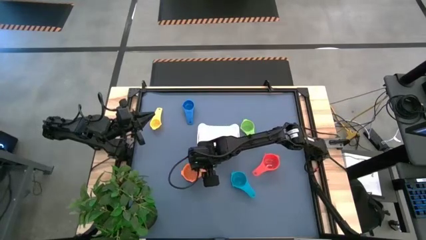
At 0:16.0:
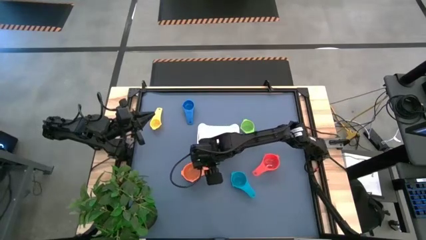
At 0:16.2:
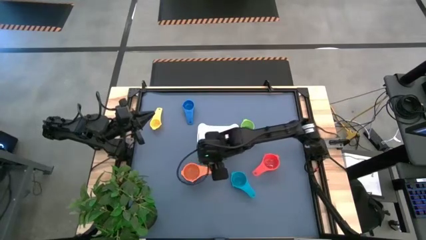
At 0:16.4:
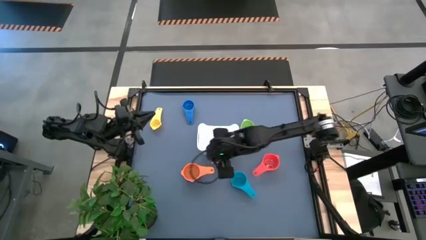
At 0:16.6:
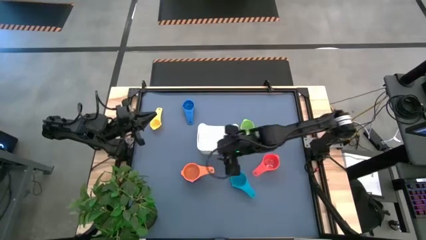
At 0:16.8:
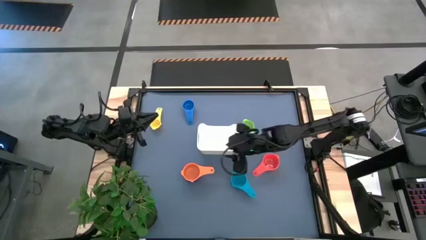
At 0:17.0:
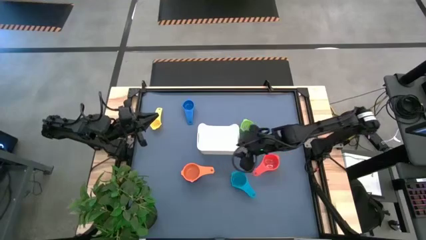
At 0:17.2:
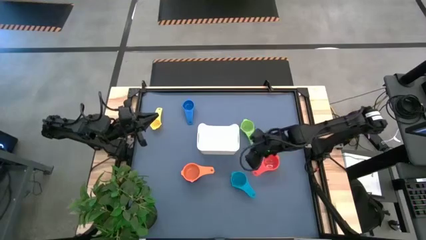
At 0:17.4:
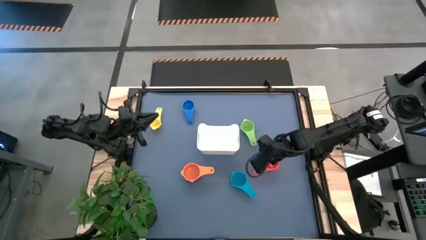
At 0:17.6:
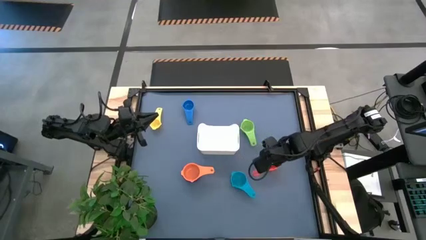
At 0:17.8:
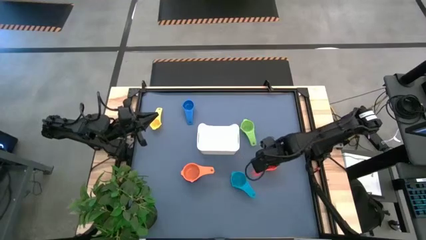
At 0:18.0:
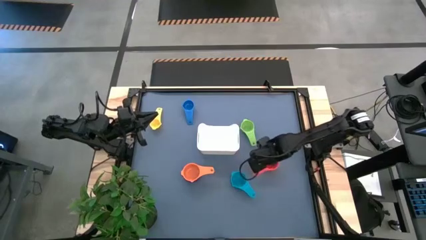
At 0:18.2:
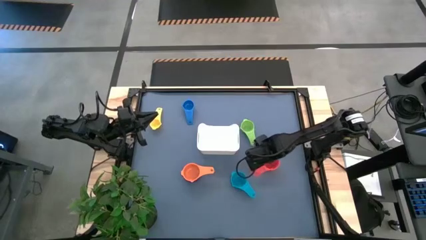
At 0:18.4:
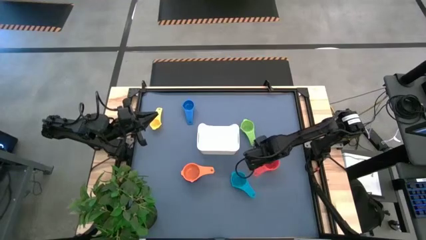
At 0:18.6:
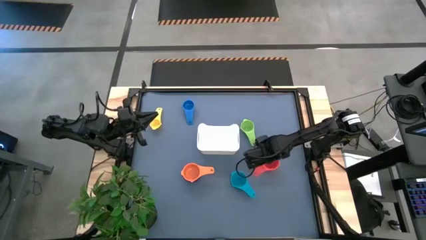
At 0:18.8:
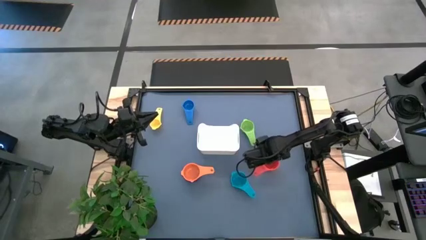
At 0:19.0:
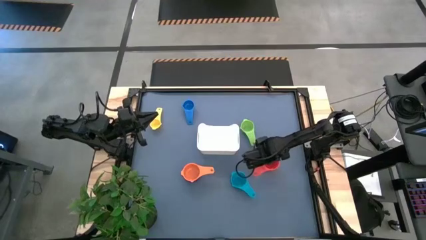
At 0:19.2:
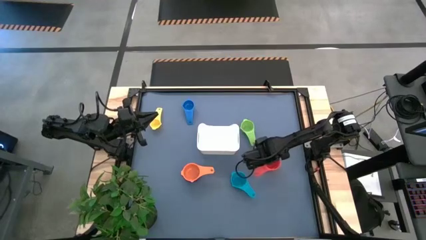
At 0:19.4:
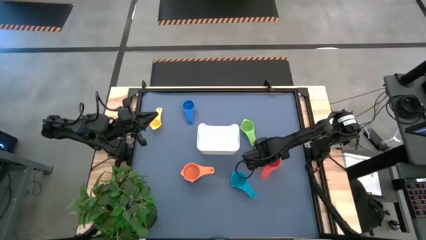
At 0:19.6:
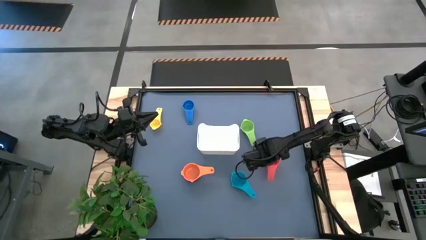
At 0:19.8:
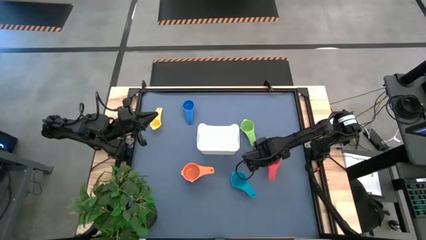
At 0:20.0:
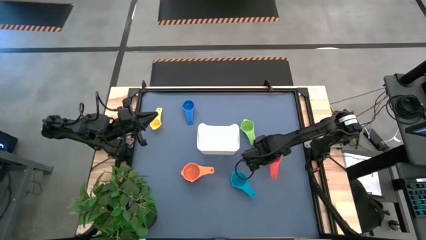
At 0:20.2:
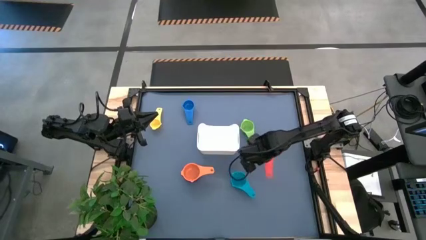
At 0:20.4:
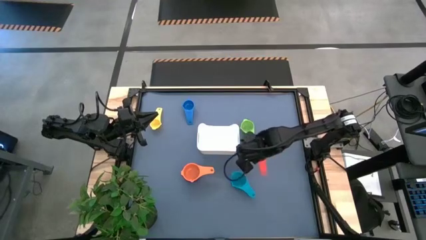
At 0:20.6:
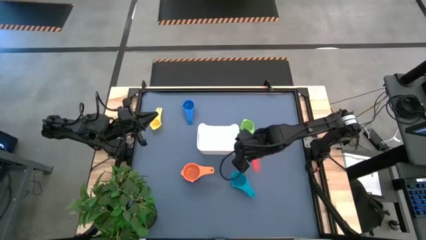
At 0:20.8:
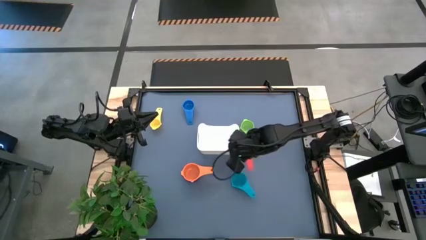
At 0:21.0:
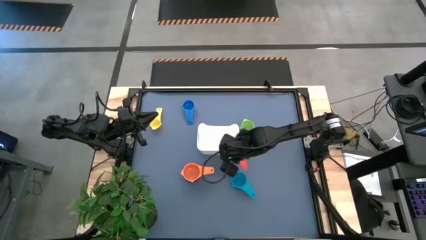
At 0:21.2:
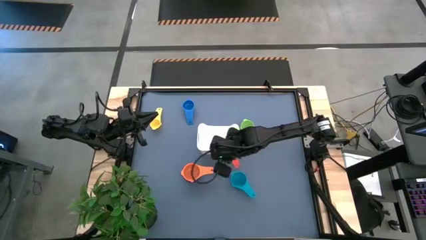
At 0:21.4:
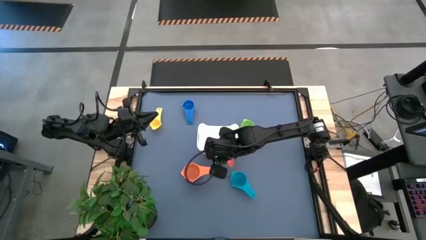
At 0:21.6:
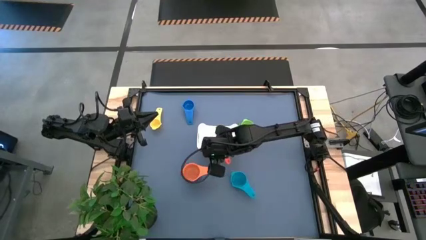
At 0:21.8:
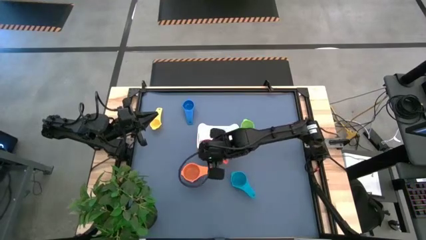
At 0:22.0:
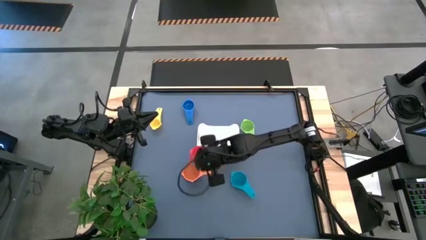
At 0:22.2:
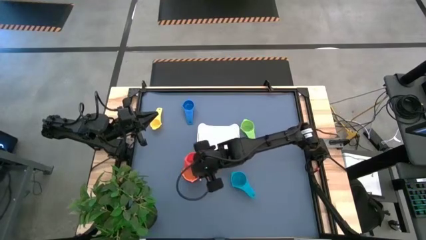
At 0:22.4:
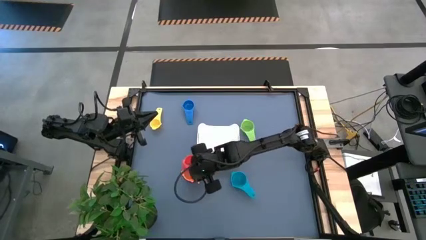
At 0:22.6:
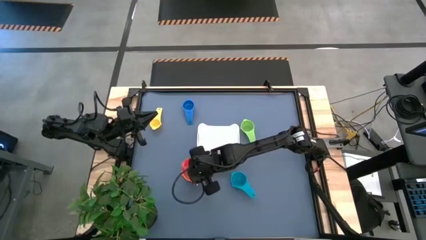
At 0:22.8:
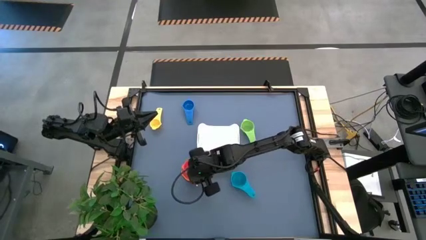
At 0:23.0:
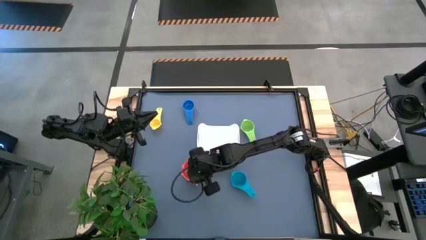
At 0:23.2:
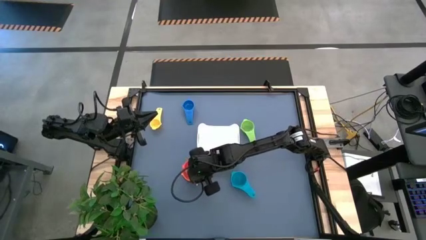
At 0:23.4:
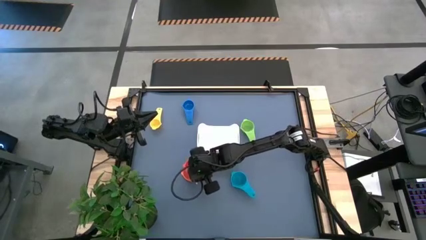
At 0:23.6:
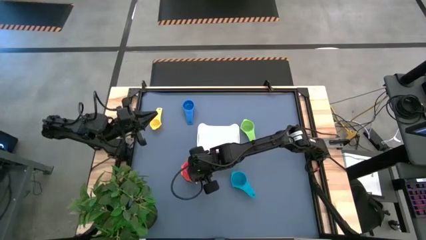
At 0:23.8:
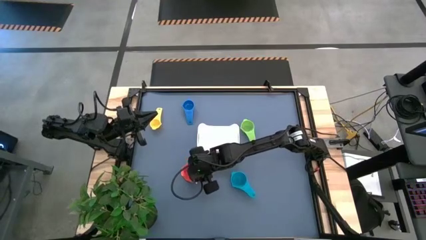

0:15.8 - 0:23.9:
Task: Nest measuring cups in basket
Stack the red measuring cup on the orange measuring cup

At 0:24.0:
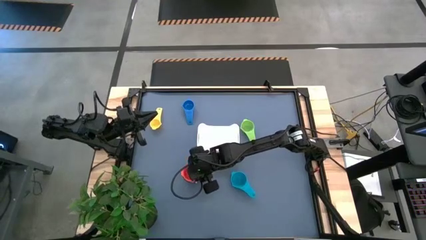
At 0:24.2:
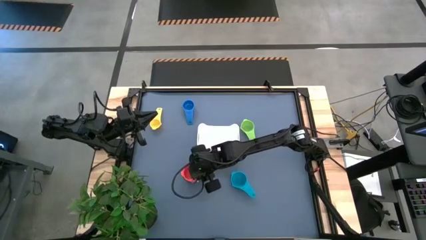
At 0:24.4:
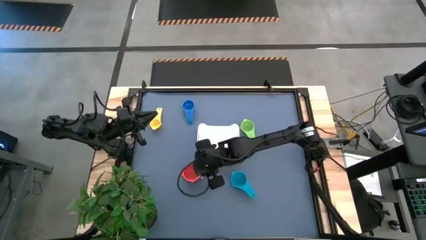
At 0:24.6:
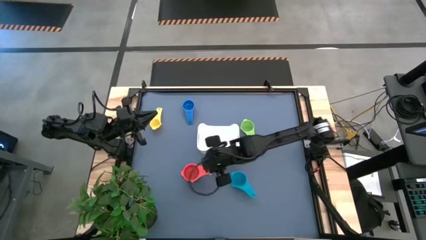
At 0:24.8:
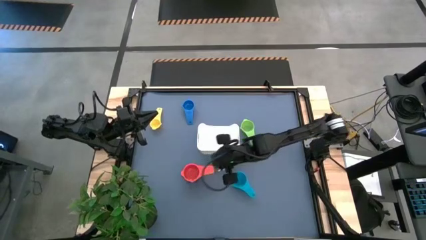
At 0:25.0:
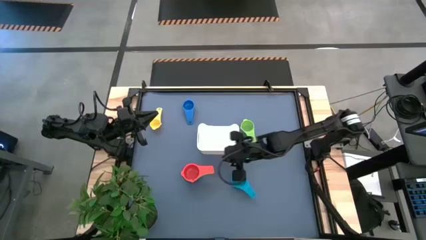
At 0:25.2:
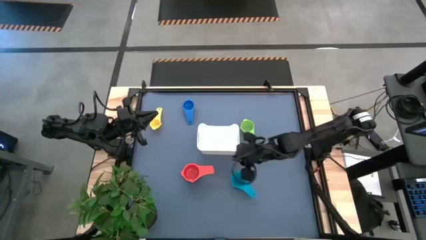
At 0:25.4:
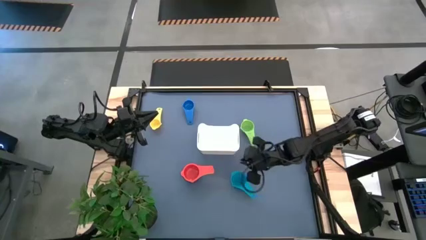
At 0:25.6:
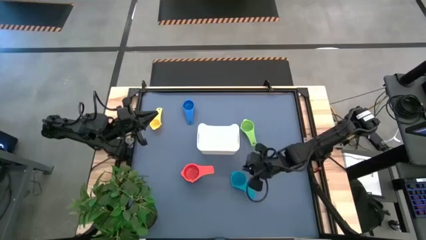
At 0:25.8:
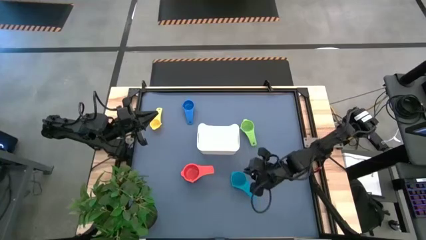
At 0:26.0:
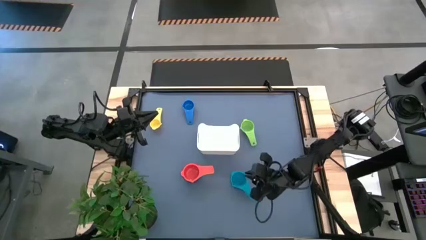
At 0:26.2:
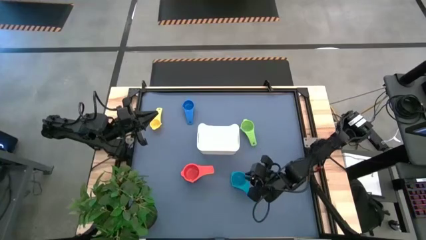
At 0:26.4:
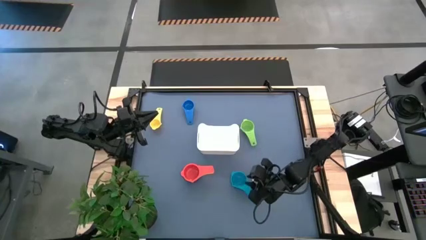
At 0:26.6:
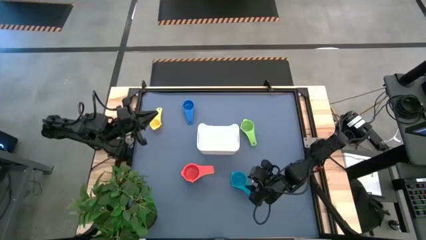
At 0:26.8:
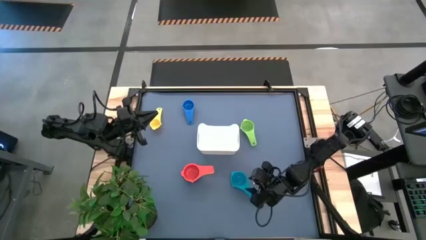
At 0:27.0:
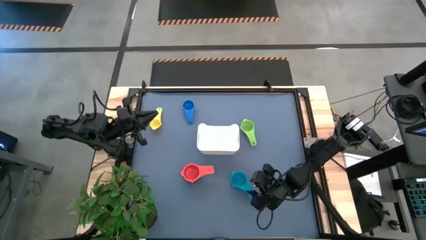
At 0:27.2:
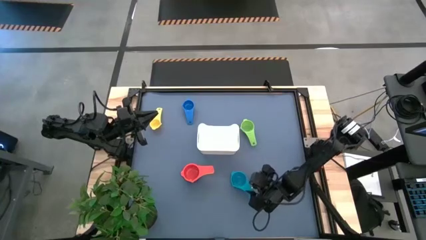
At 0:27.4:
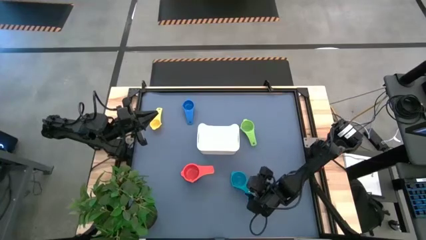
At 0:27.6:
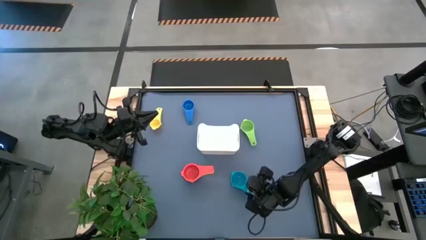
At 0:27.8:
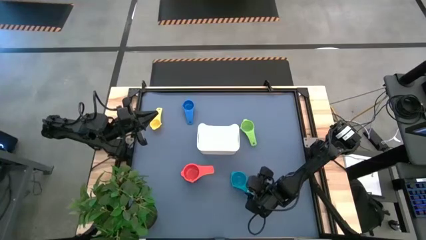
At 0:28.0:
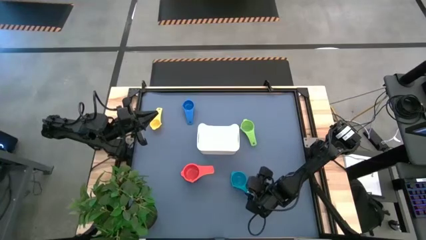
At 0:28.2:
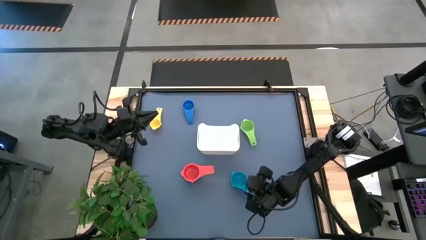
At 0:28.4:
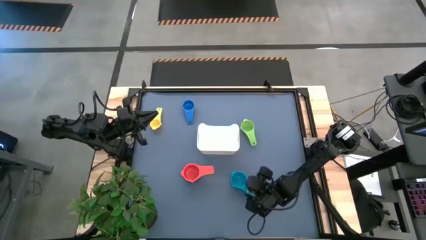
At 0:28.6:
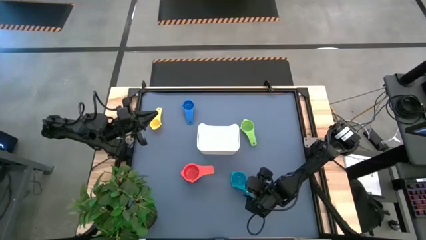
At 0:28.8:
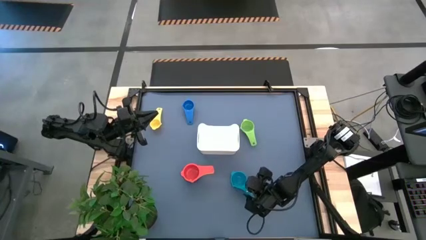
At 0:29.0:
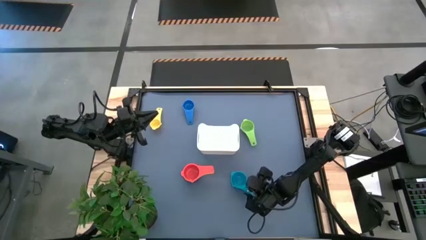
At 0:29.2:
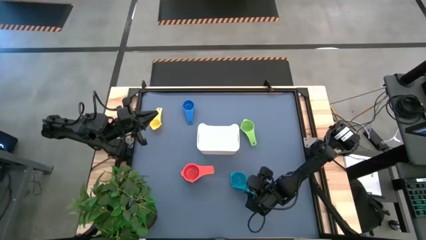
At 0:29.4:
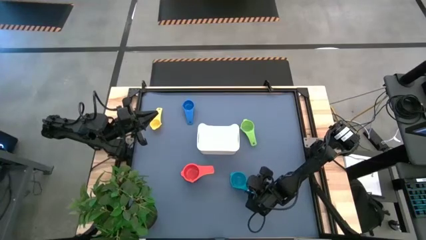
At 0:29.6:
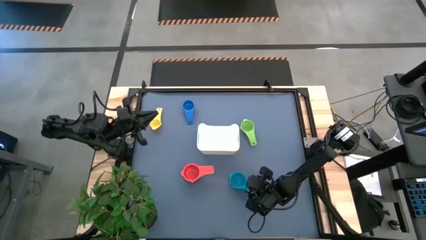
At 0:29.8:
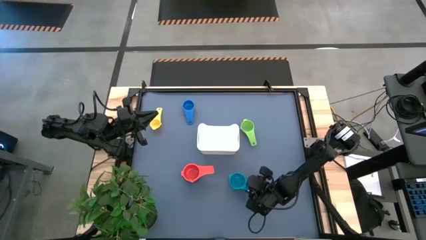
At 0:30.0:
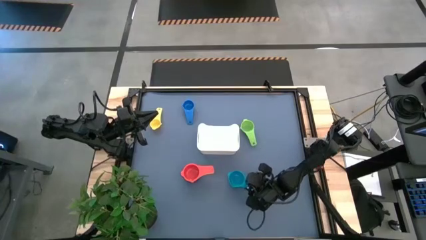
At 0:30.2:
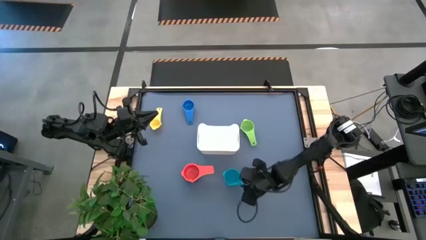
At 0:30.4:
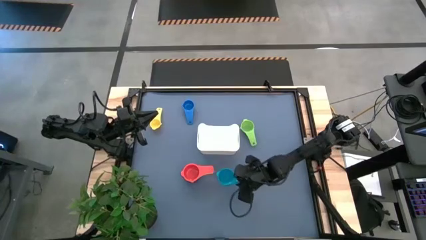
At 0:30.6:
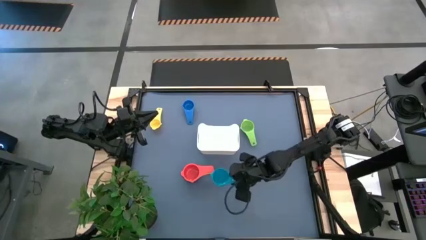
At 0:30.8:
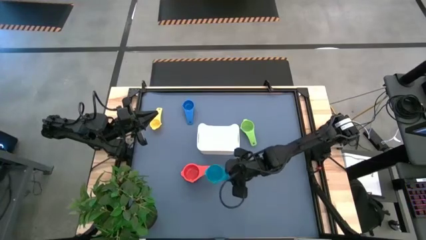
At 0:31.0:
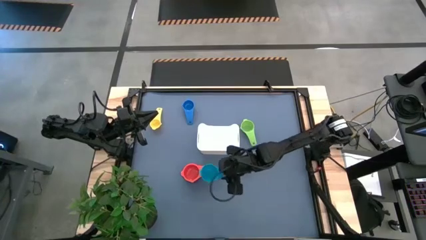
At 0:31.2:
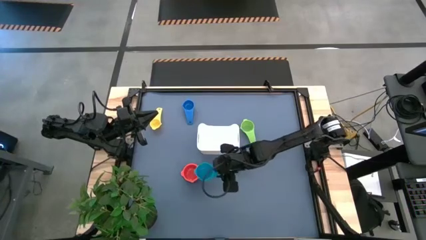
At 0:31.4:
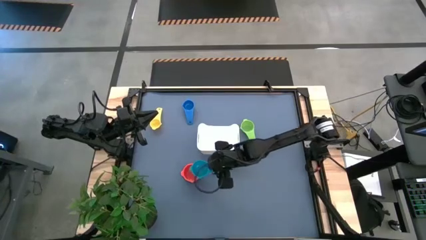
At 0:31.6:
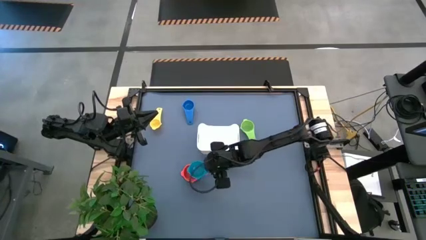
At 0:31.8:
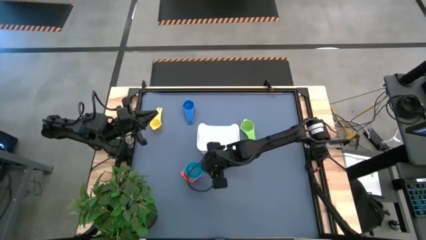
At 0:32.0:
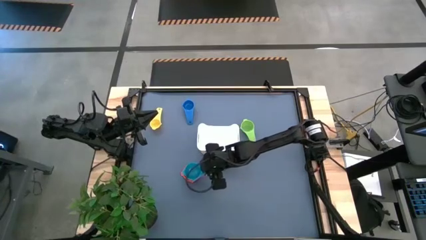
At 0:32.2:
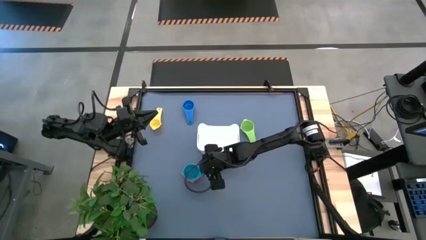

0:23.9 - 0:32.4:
Stack the light blue measuring cup on the red measuring cup
